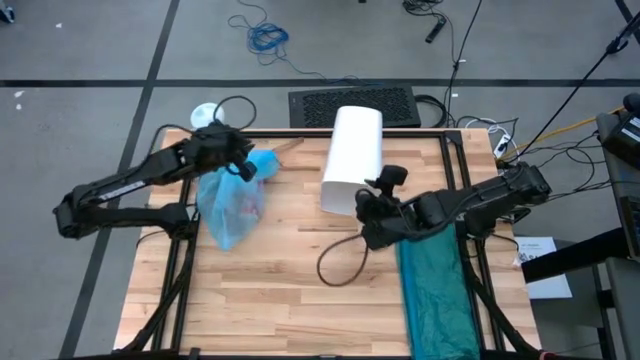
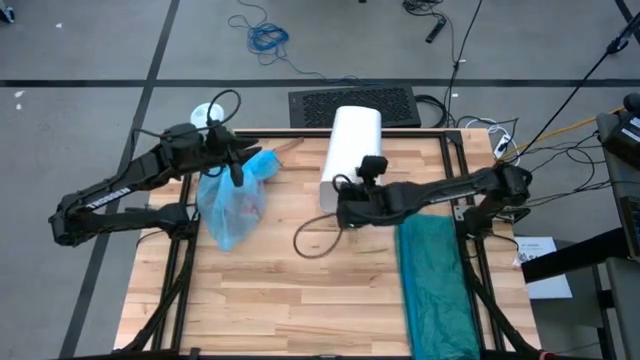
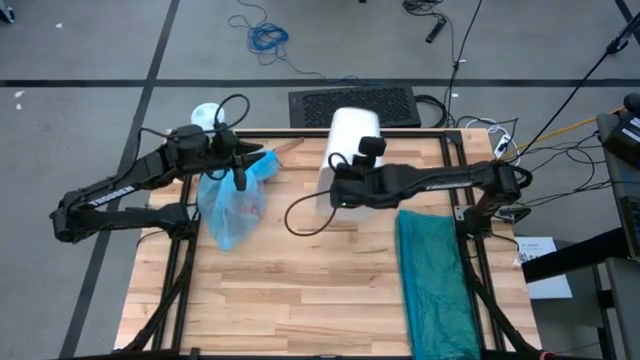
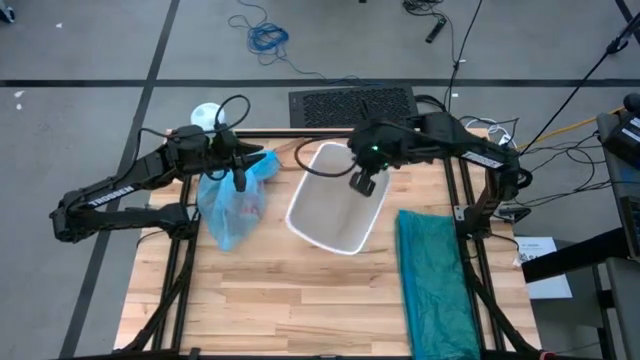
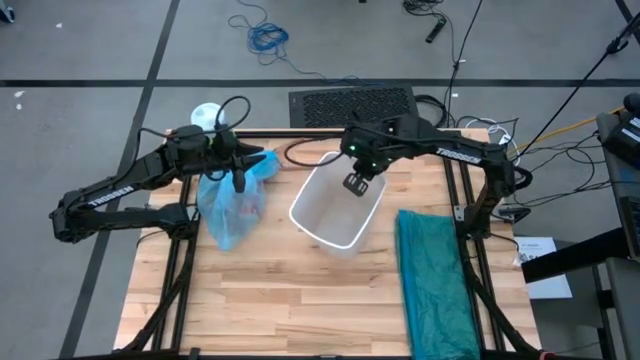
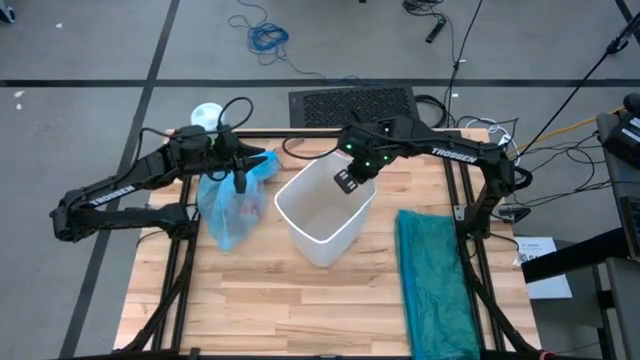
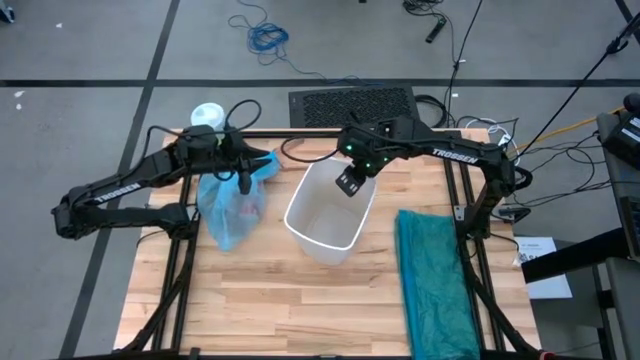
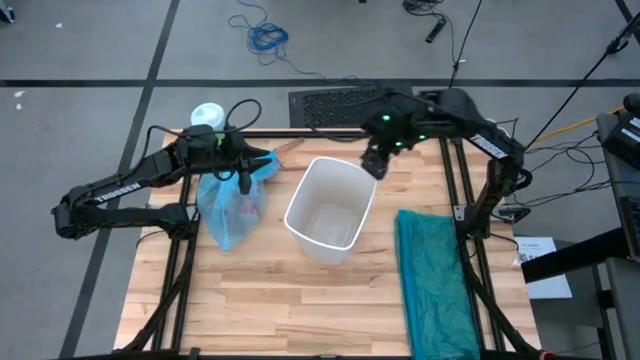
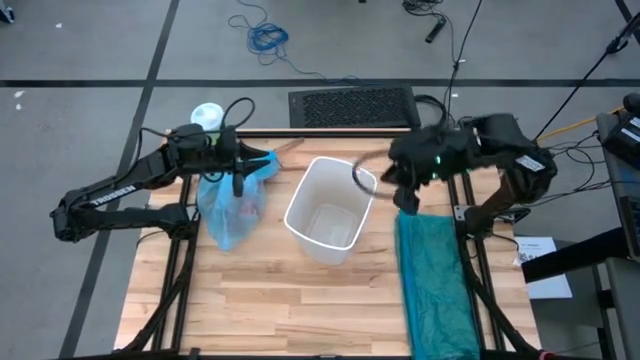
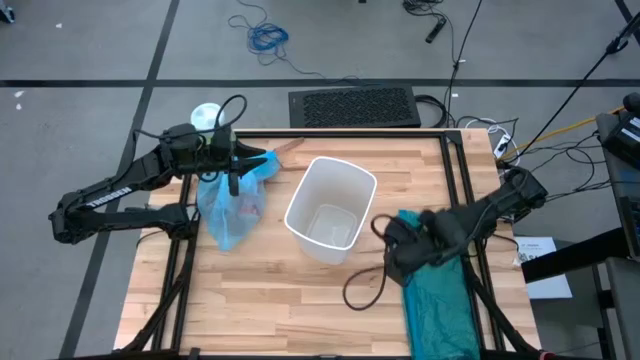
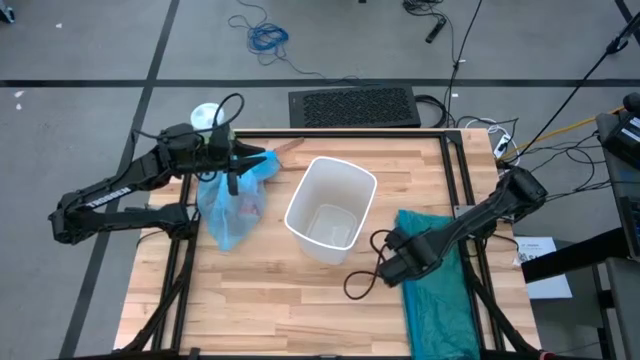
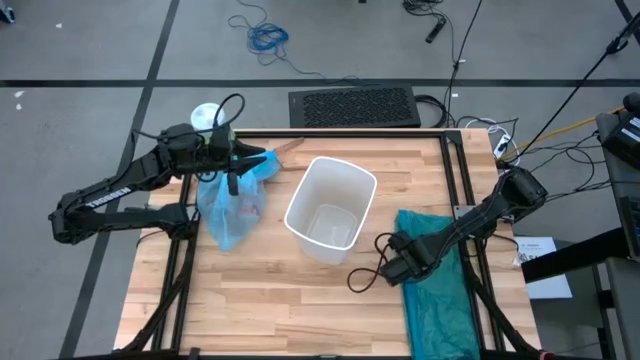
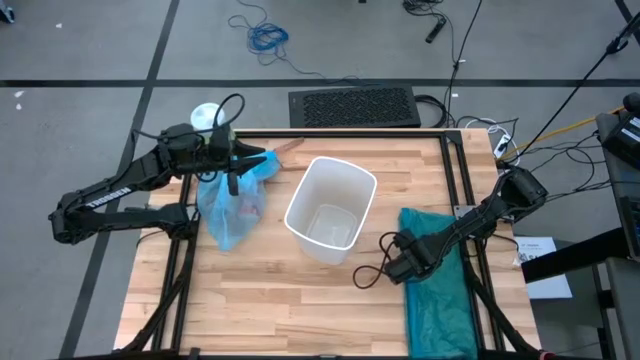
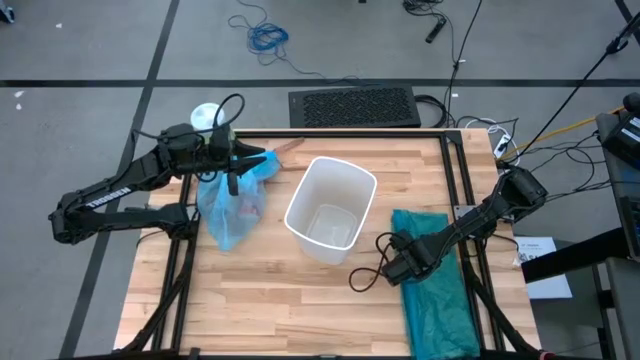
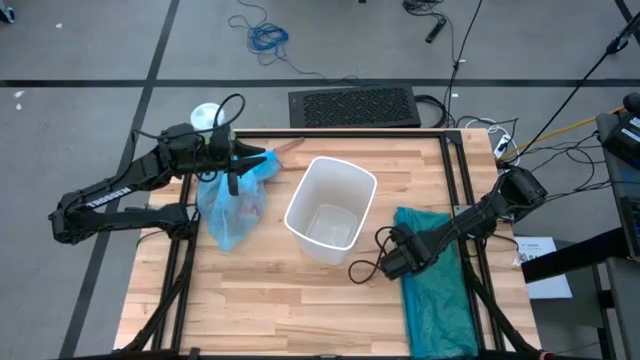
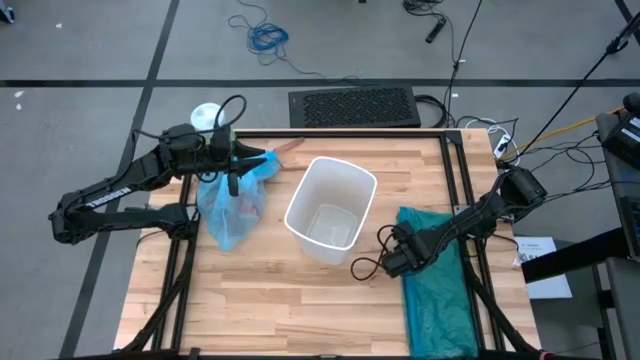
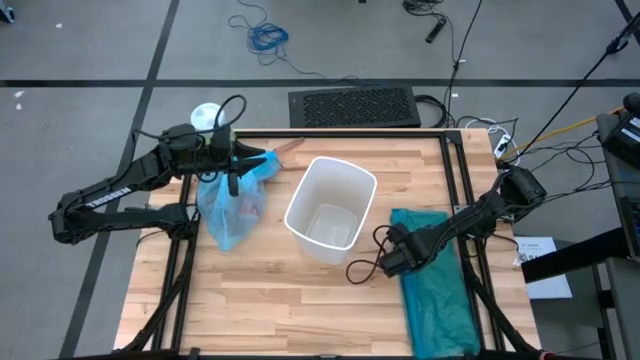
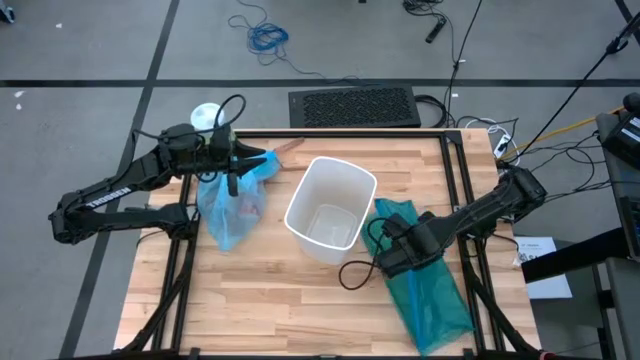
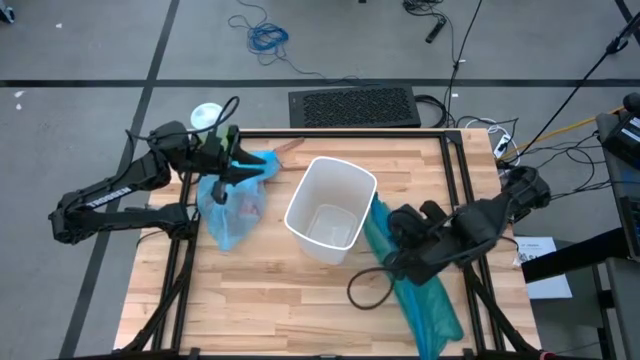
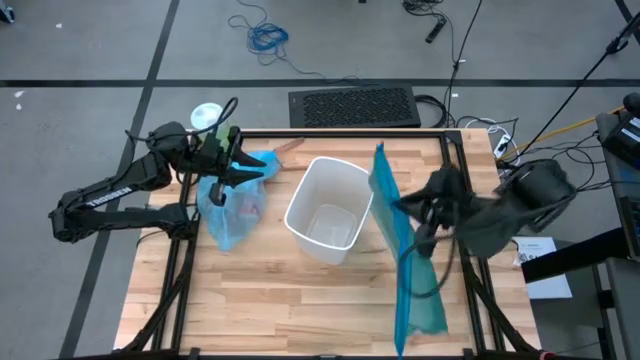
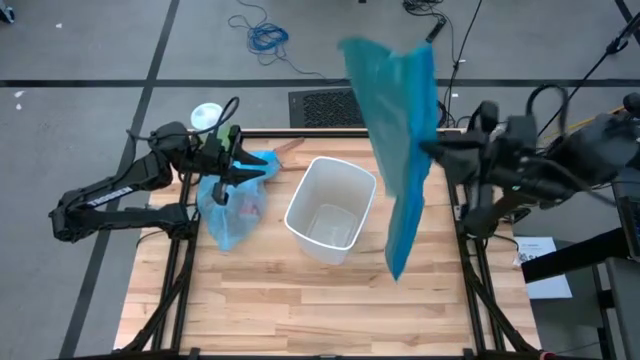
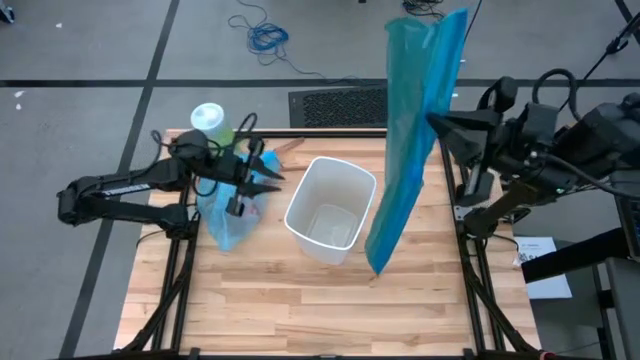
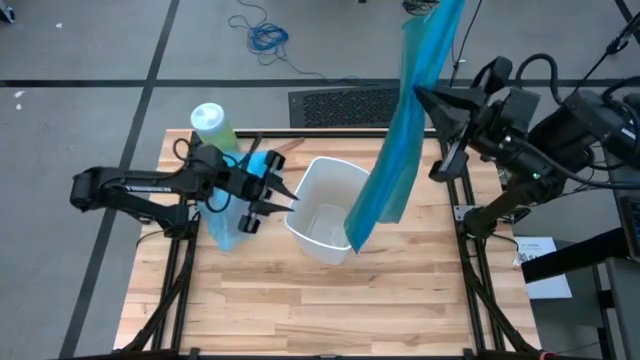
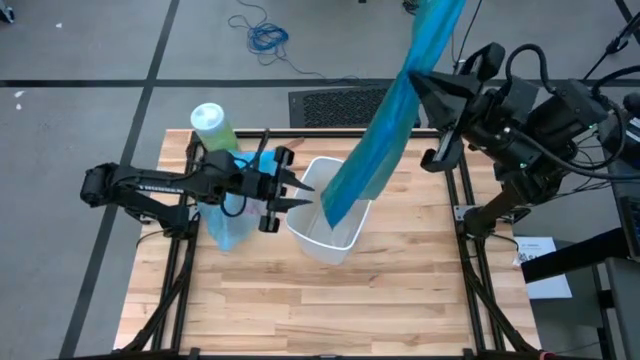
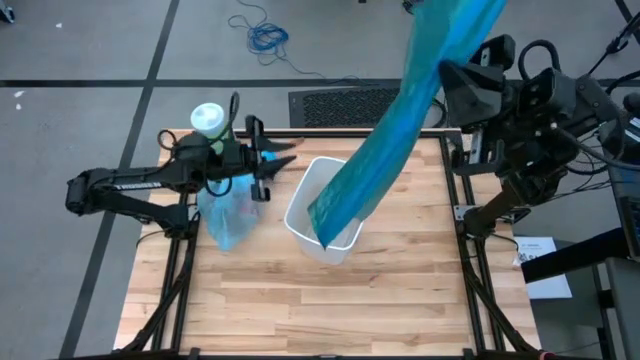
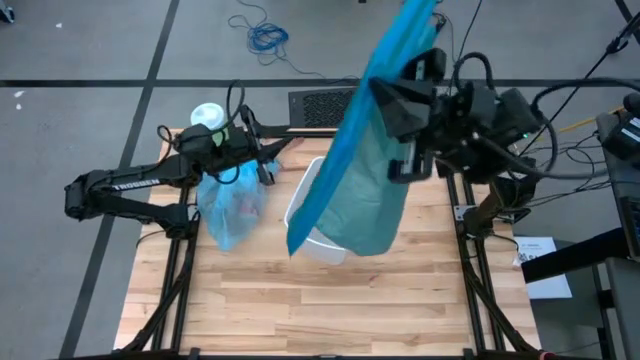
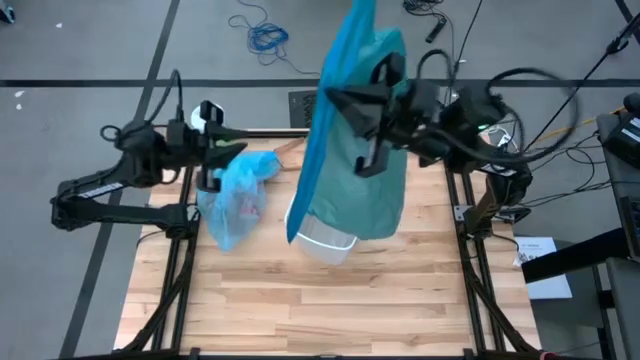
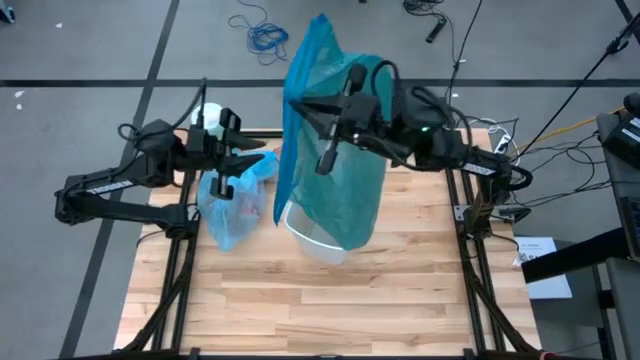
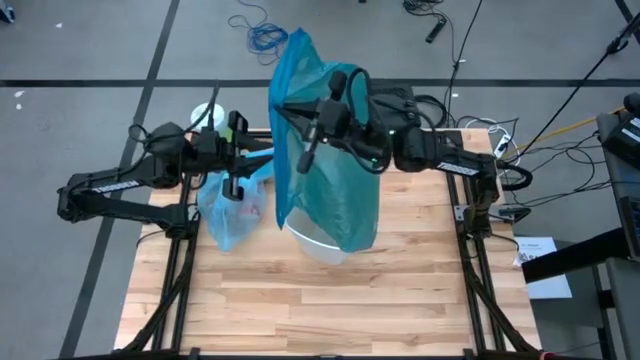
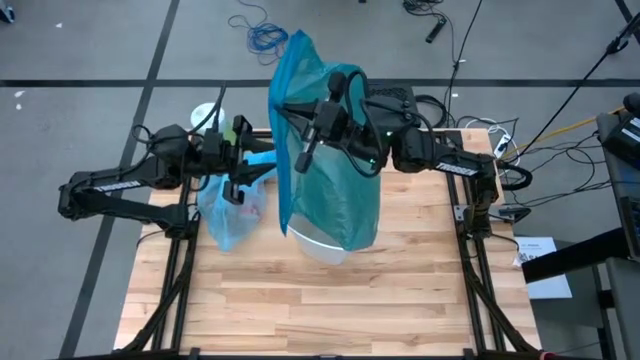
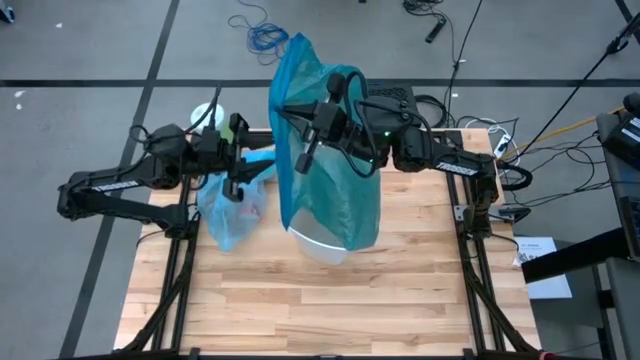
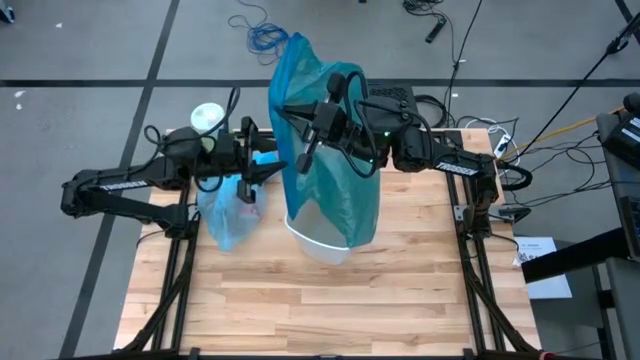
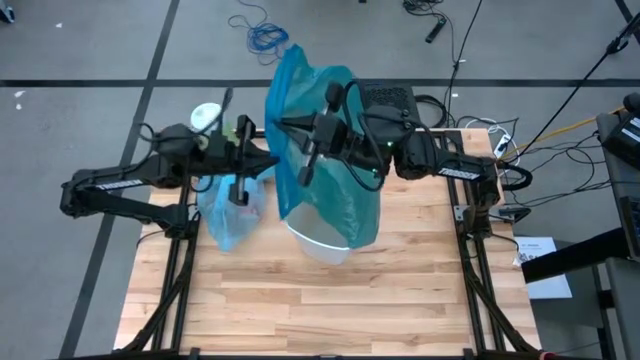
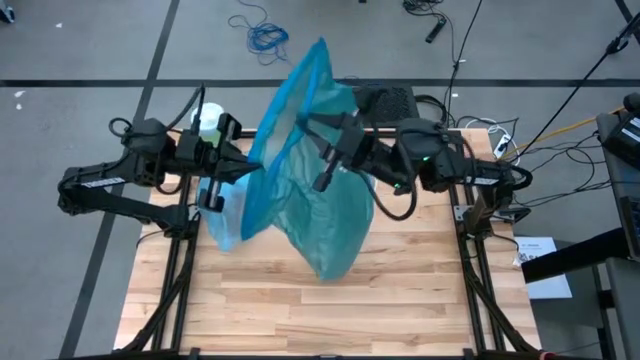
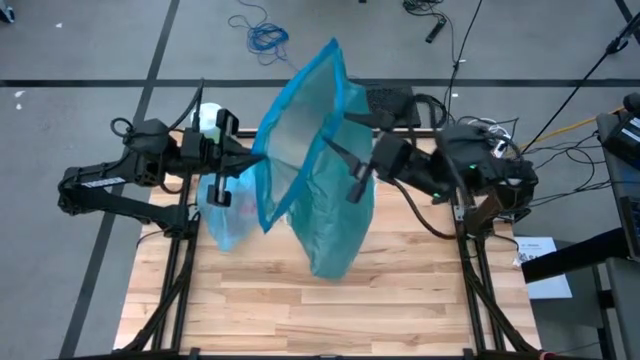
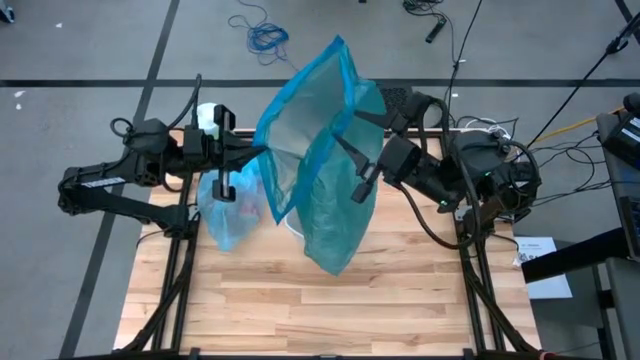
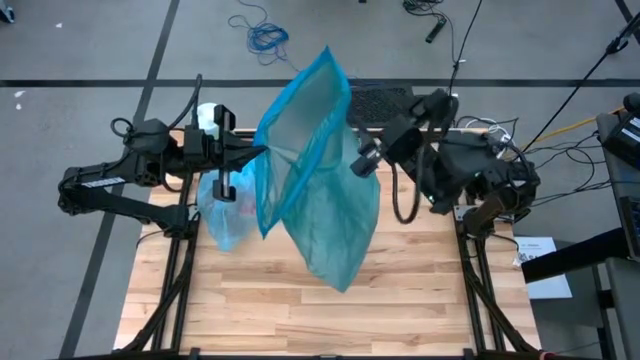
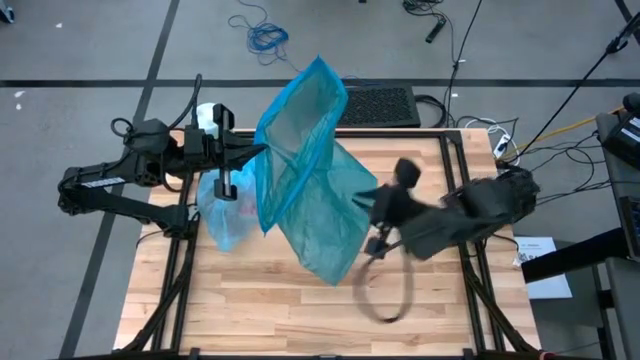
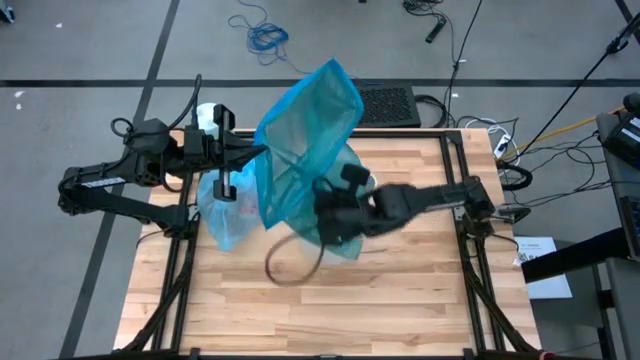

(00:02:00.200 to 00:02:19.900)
Task: place trash/remove bag and relplace
Insert the plastic bag in the white trash bin

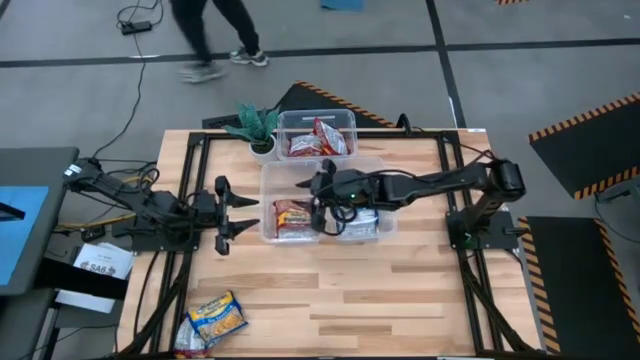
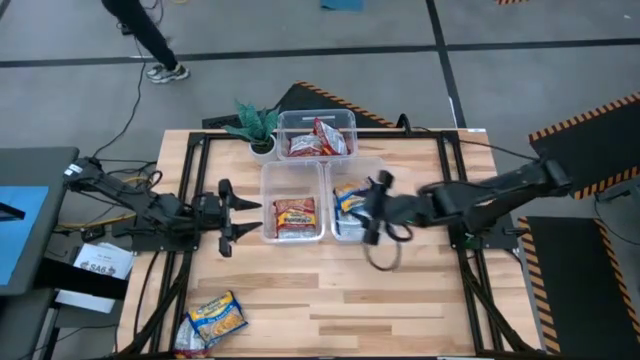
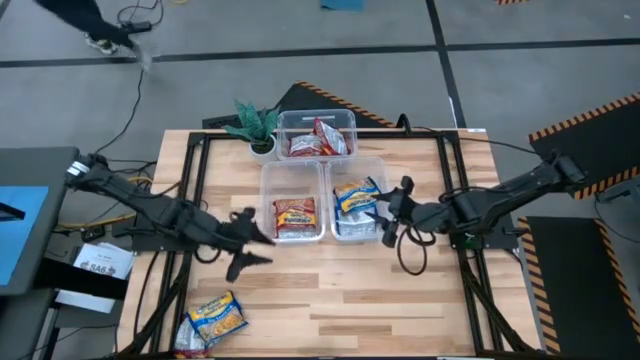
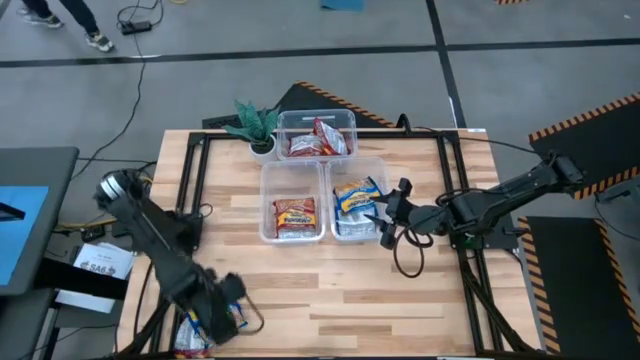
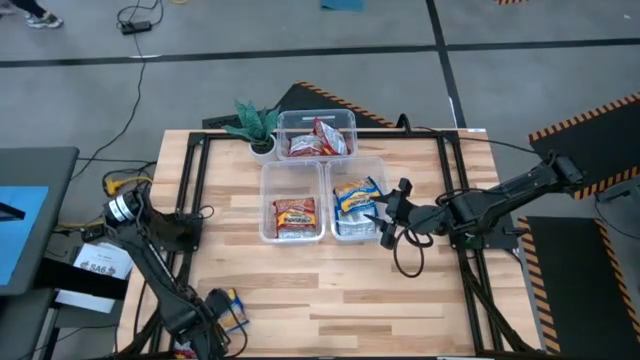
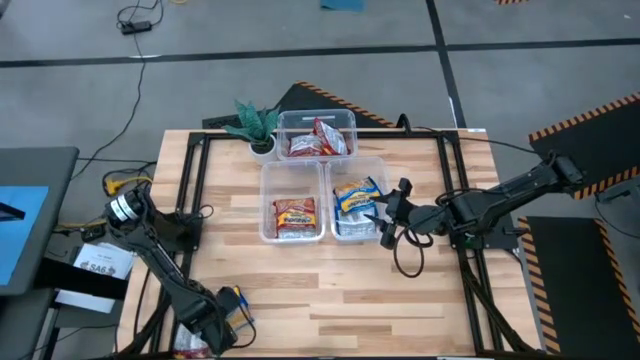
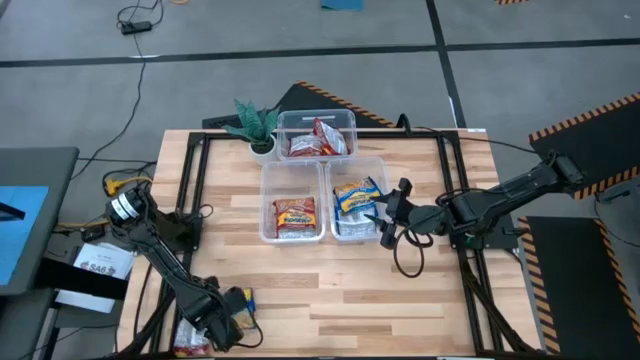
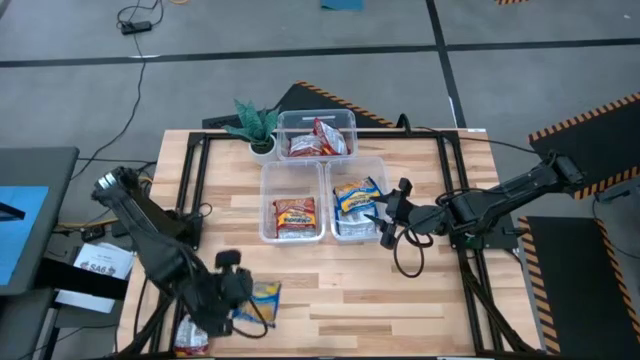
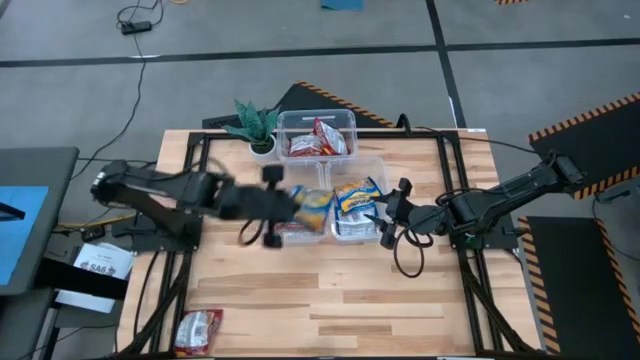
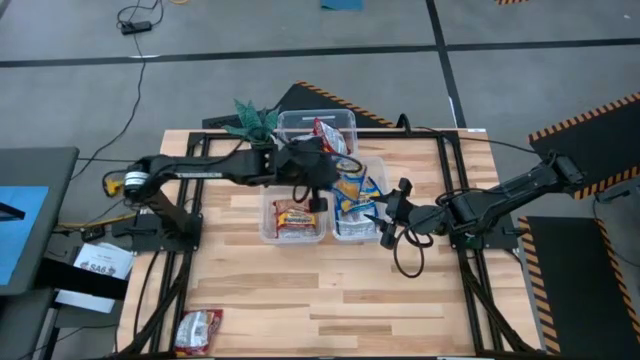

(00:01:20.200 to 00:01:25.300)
Task: Sort Maruchan noodles
Put the blue noodle pack into the bottom right transparent bin
